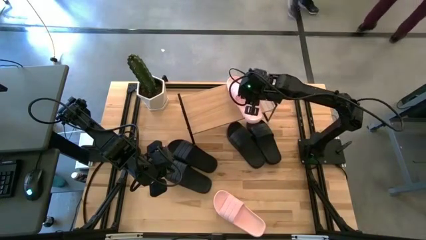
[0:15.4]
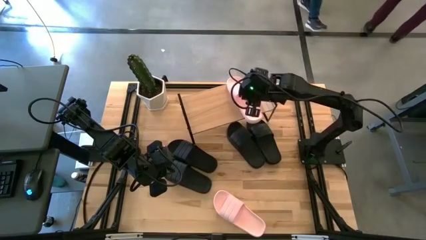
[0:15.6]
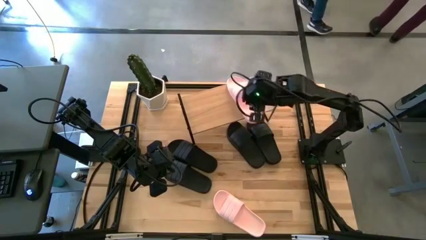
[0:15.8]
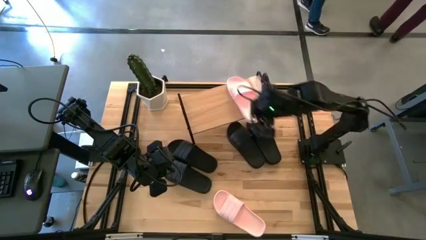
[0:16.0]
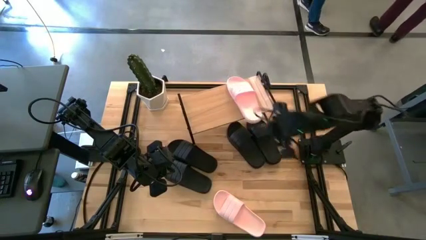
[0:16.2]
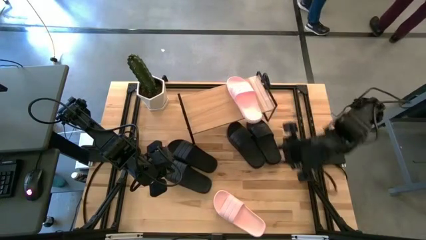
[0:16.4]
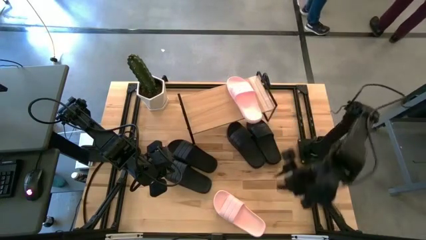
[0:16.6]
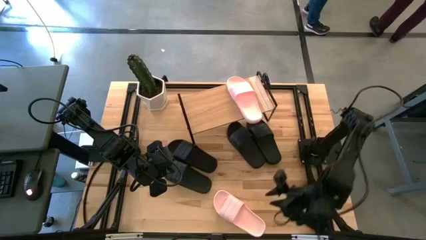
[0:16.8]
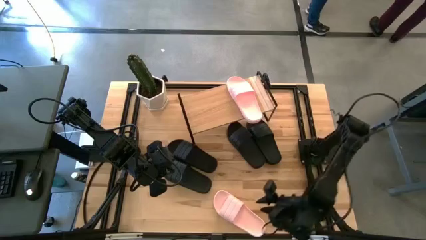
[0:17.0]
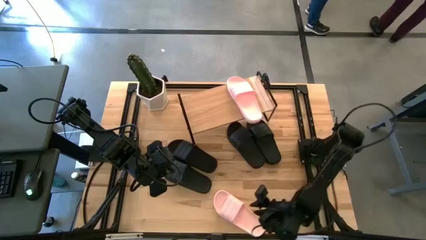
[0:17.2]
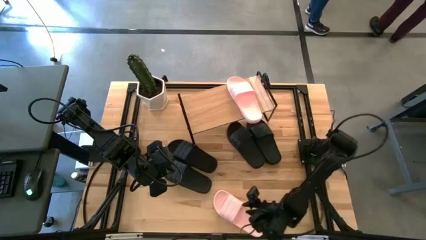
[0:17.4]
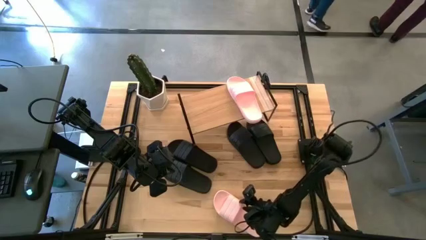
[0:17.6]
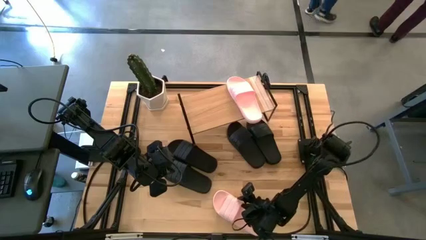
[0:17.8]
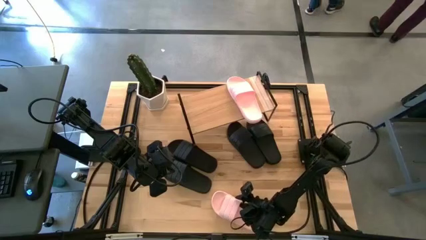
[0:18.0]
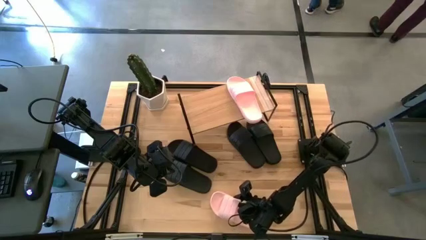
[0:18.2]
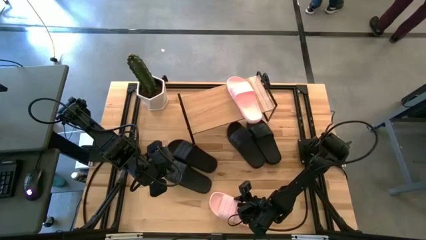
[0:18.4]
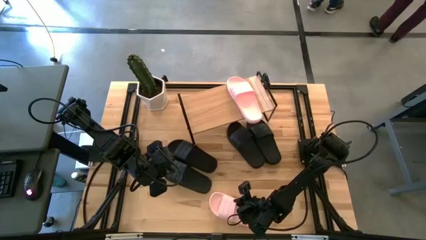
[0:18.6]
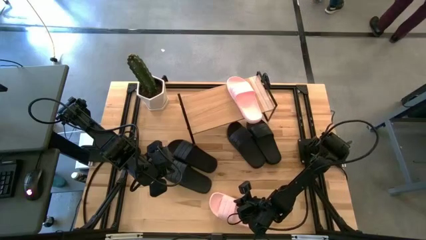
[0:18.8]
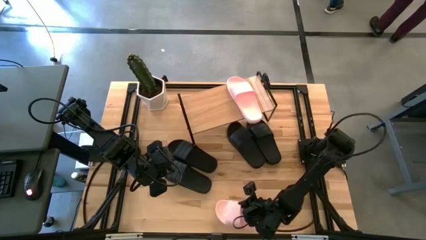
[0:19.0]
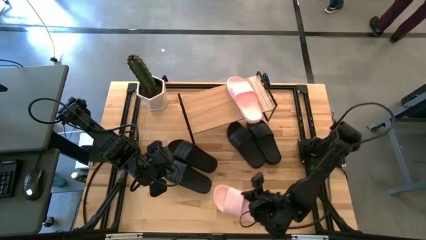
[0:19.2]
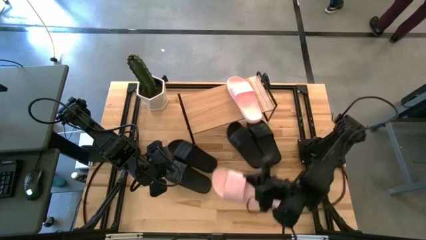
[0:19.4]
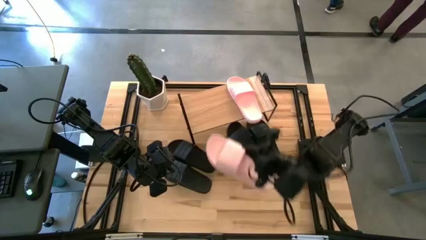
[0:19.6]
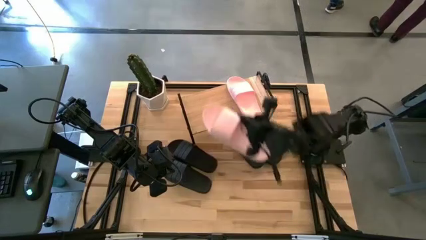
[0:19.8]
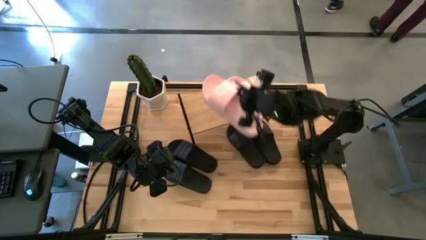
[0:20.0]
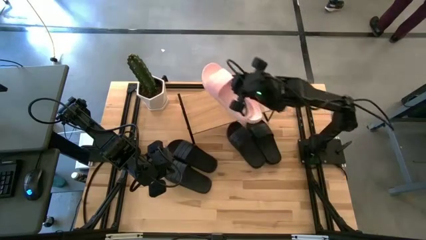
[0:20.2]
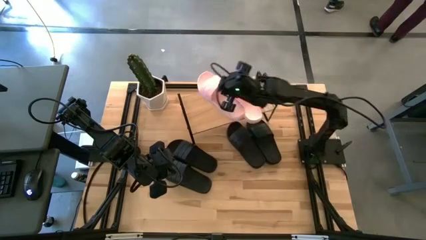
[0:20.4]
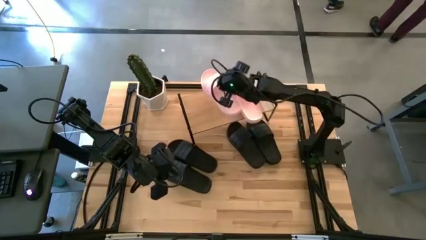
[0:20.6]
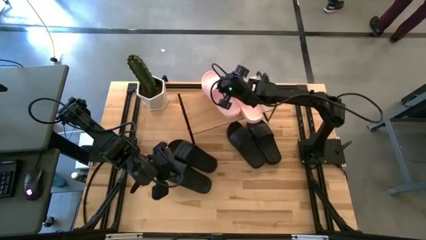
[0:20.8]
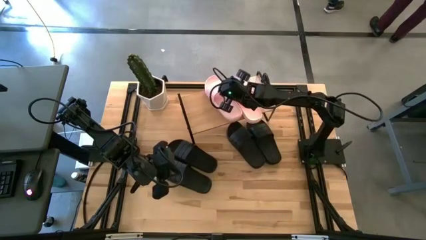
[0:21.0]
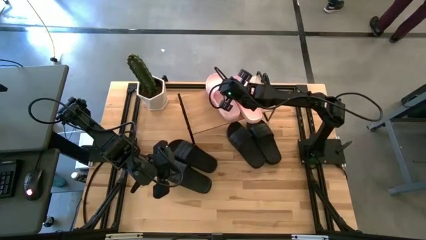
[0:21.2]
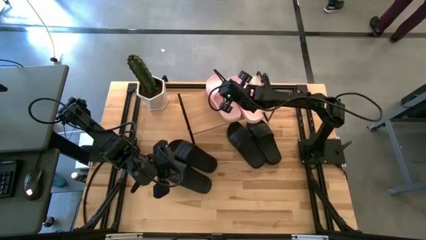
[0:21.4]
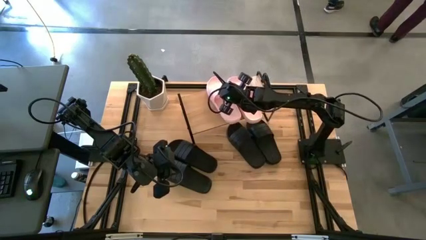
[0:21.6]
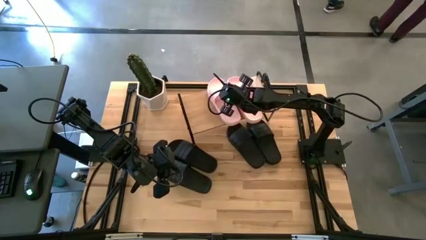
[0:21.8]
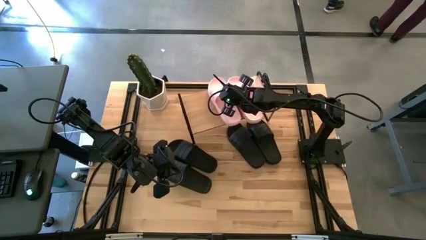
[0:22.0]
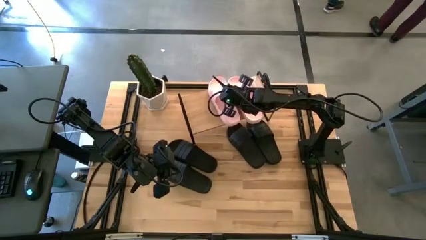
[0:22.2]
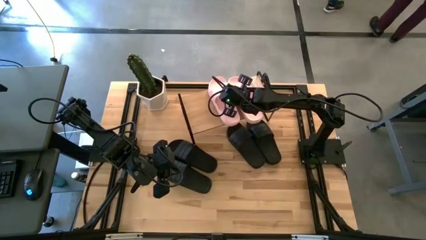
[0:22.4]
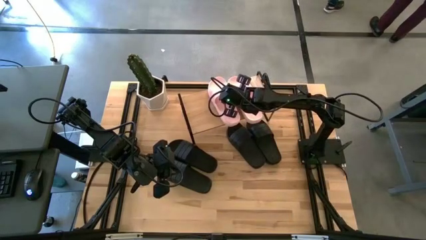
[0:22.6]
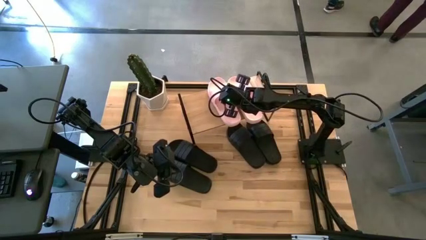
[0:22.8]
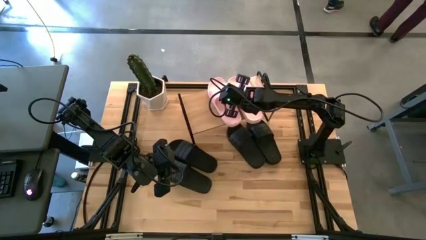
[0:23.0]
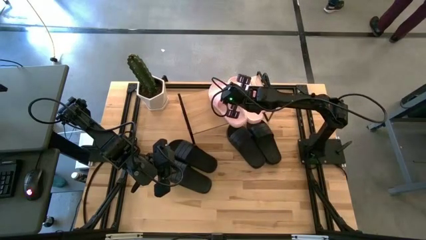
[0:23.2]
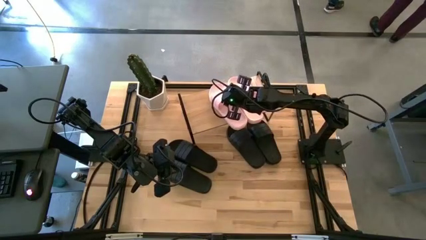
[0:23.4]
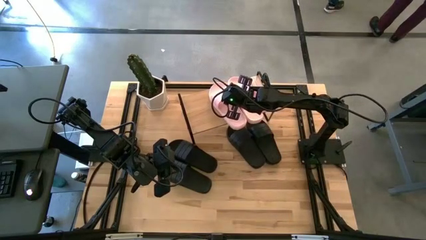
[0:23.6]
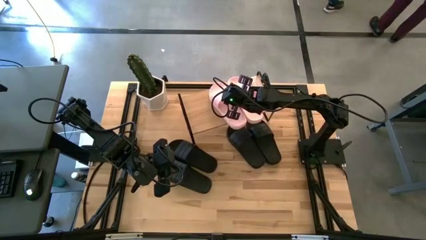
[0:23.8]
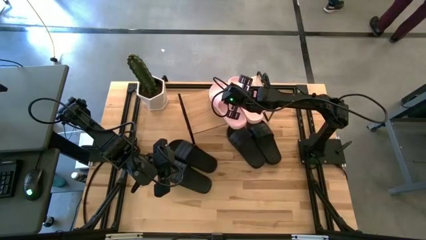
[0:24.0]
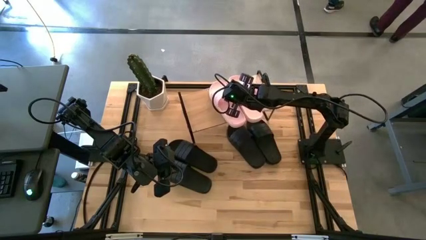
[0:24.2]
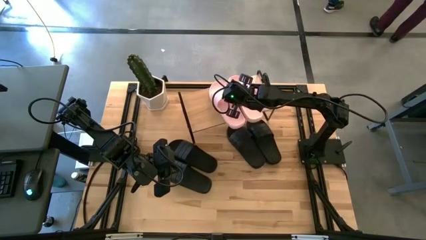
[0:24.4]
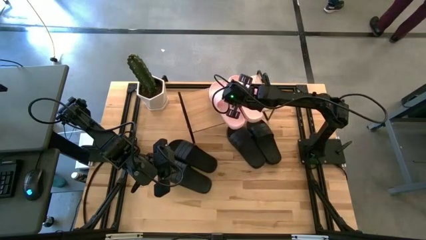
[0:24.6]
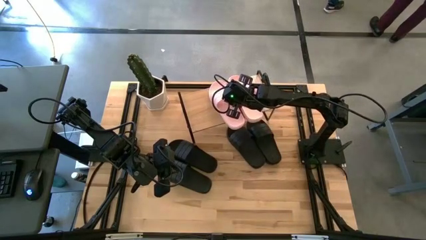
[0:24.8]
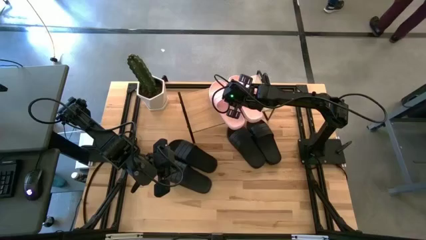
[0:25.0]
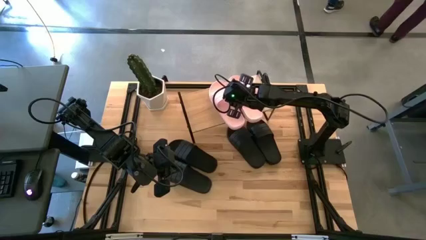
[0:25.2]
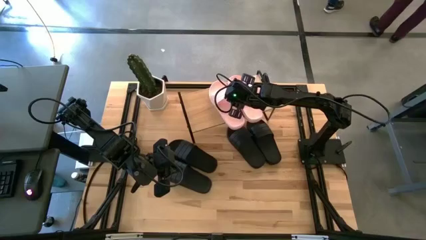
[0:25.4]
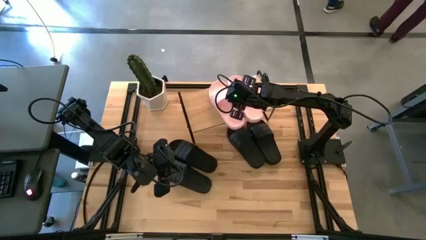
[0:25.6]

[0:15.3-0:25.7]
Task: Pick and place slides into the shelf
Put the pink slide on the shelf

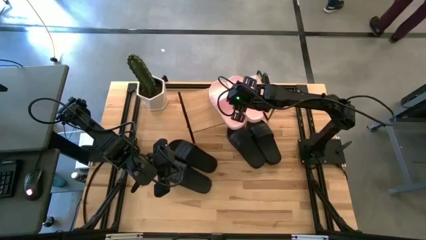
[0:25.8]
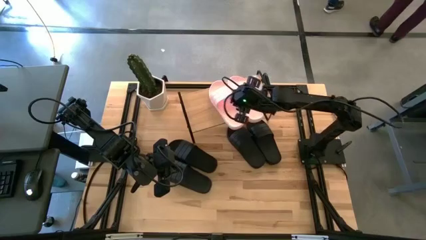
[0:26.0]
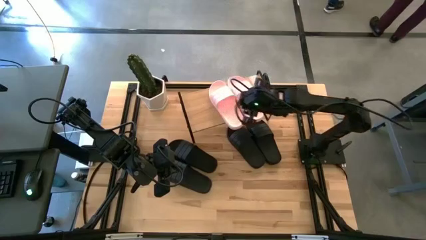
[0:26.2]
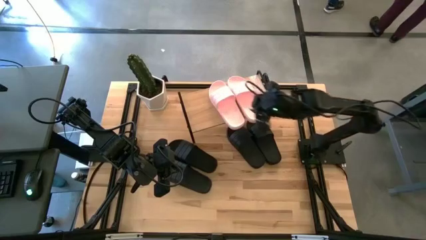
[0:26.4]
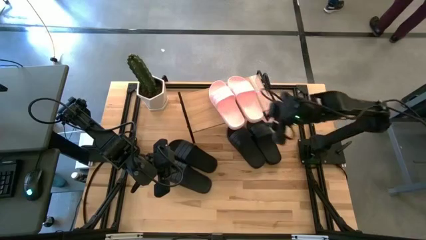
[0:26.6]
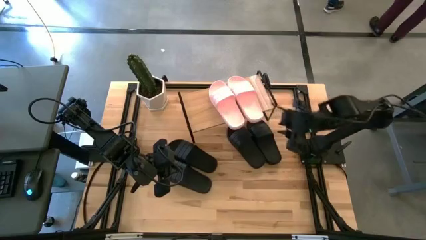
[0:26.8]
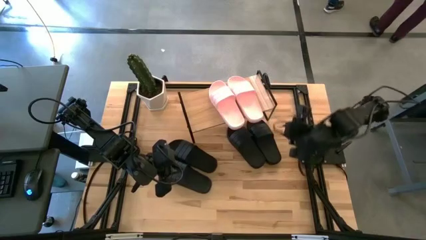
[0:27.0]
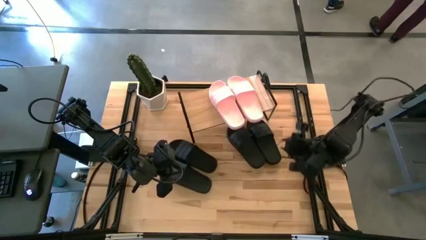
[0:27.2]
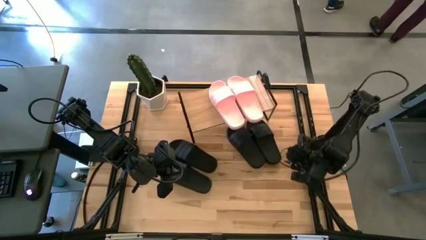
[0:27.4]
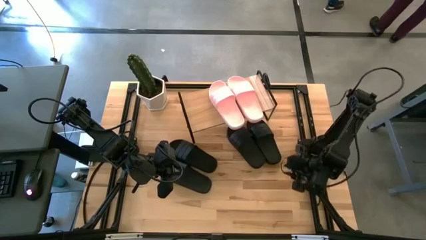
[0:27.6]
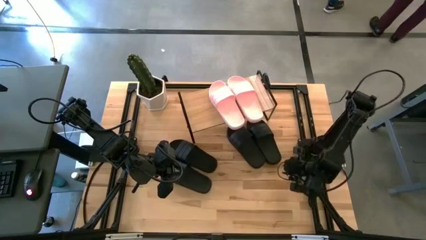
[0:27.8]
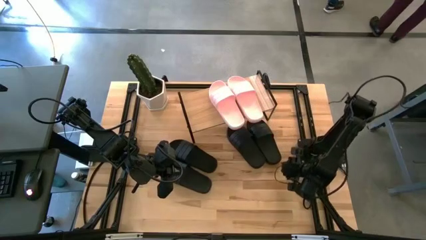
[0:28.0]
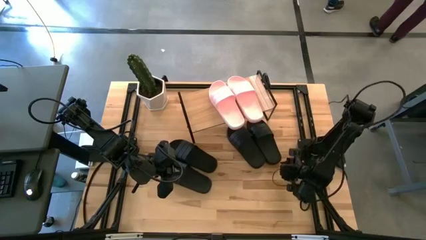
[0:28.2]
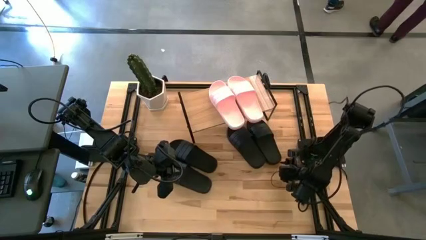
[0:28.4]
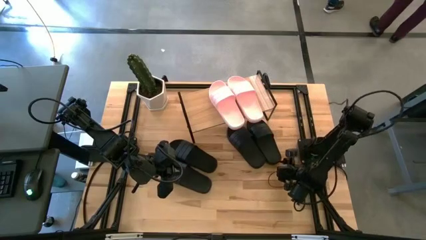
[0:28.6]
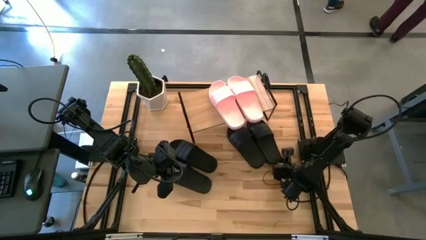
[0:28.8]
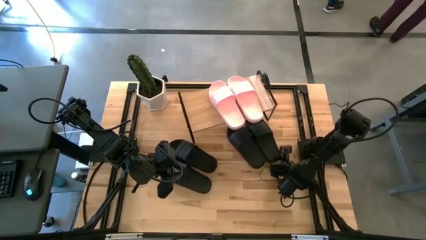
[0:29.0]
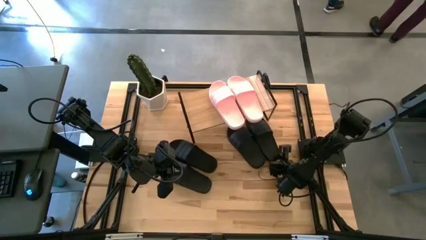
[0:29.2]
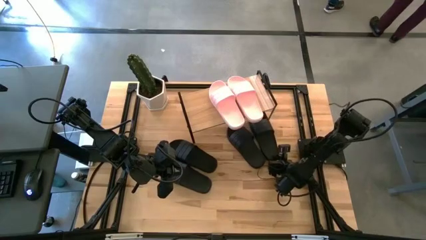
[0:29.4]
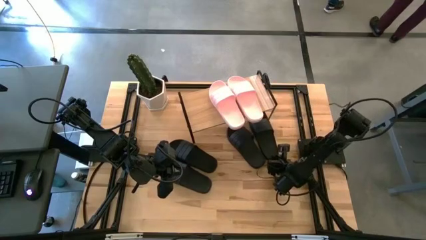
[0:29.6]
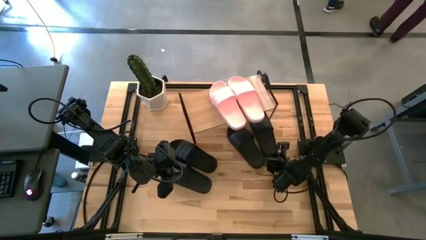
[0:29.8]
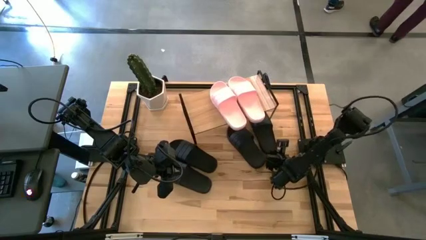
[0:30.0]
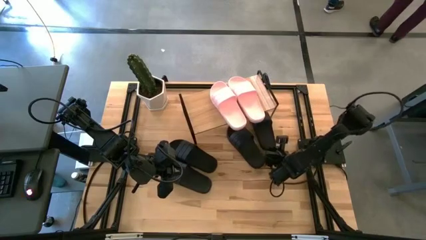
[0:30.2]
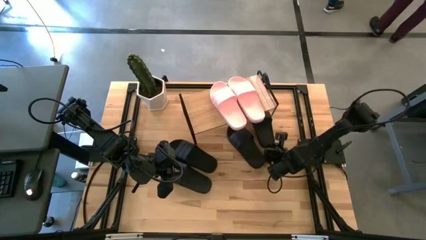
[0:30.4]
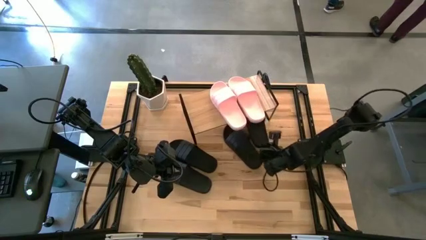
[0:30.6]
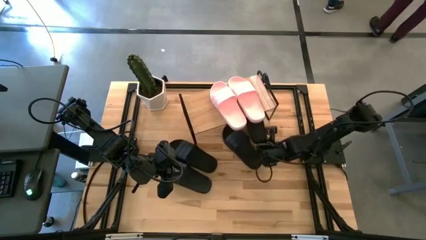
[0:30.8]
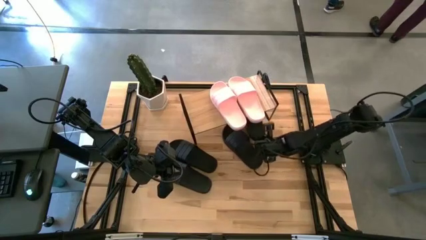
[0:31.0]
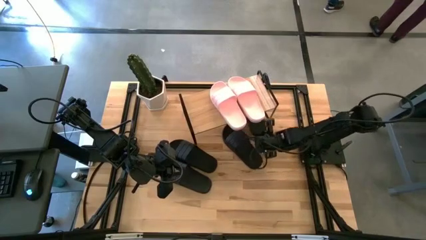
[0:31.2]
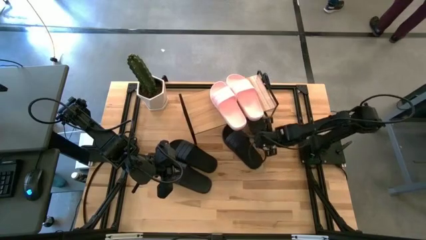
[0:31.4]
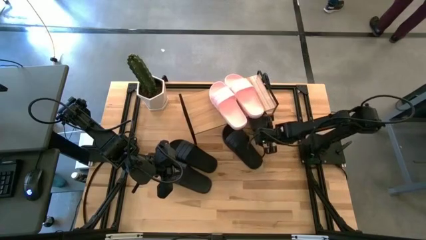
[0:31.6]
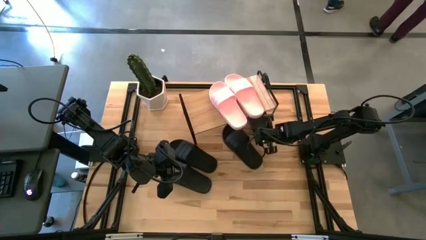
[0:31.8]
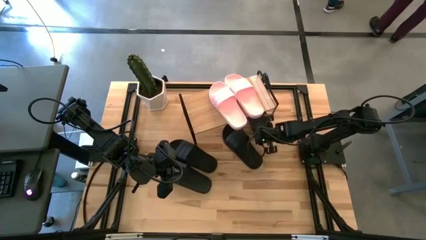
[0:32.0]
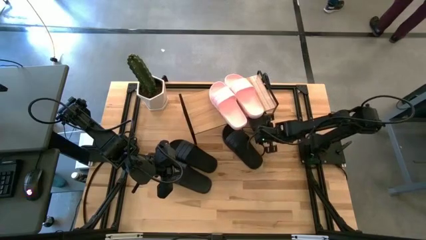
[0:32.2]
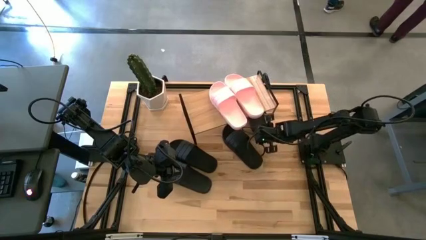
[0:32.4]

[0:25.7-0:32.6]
Put the black slide under the shelf
